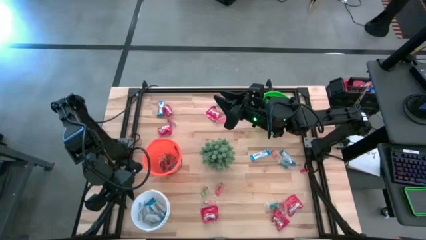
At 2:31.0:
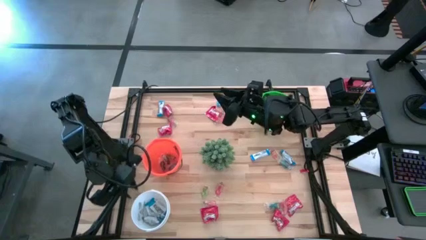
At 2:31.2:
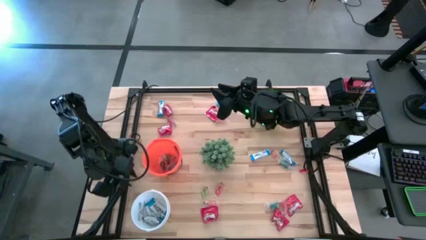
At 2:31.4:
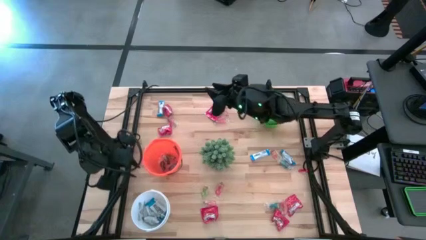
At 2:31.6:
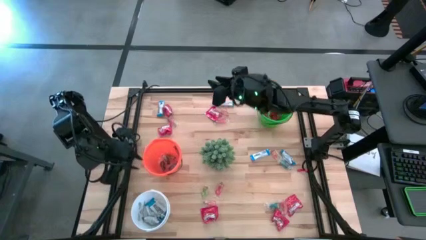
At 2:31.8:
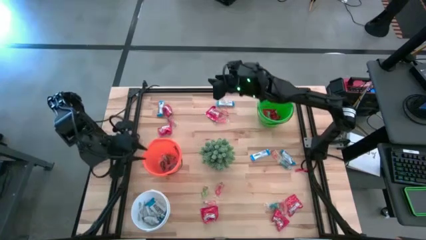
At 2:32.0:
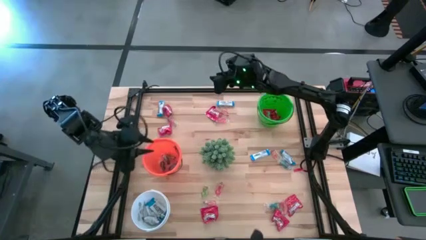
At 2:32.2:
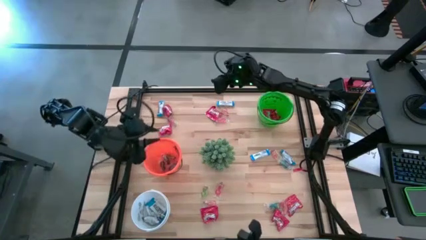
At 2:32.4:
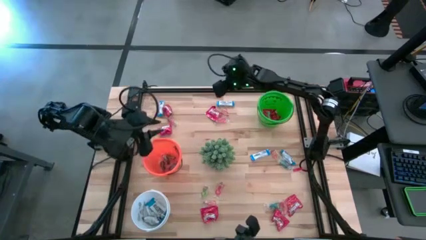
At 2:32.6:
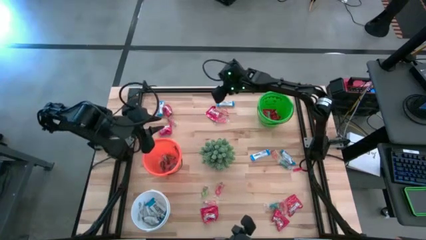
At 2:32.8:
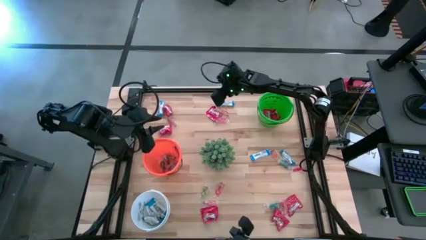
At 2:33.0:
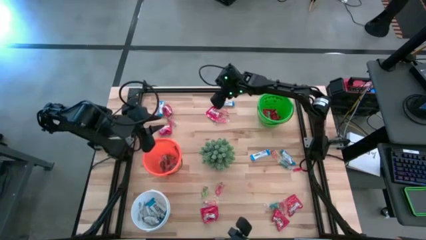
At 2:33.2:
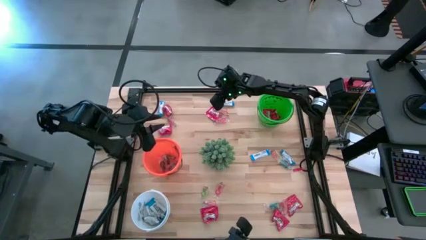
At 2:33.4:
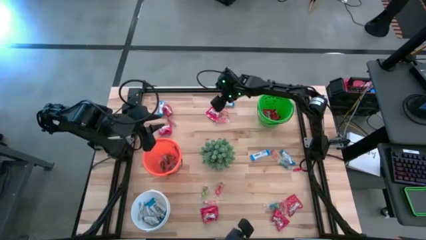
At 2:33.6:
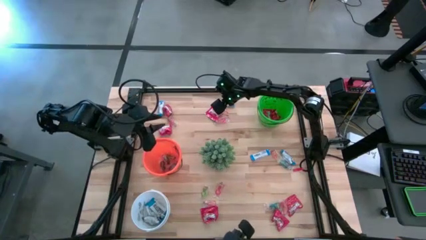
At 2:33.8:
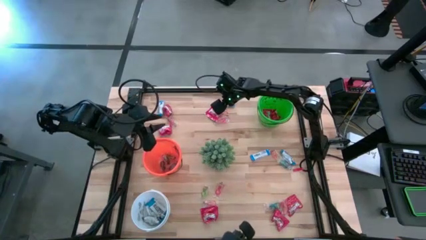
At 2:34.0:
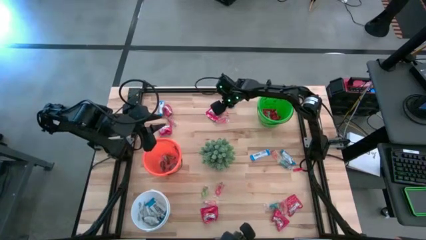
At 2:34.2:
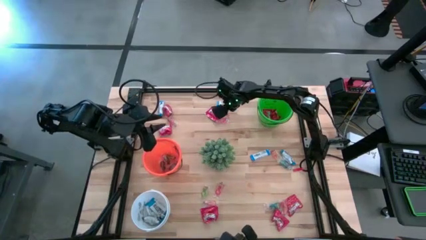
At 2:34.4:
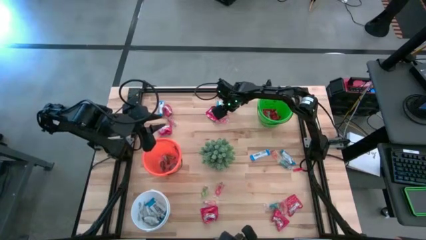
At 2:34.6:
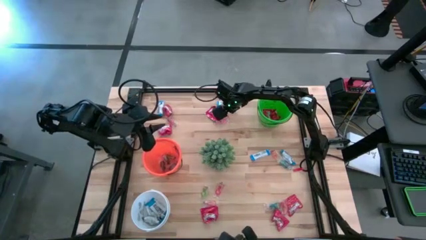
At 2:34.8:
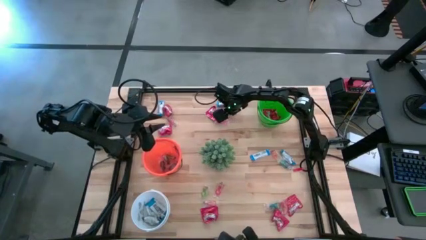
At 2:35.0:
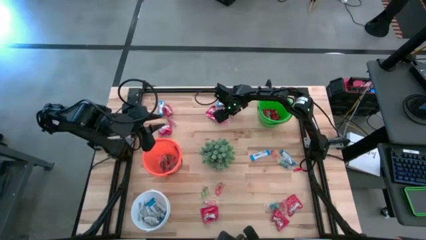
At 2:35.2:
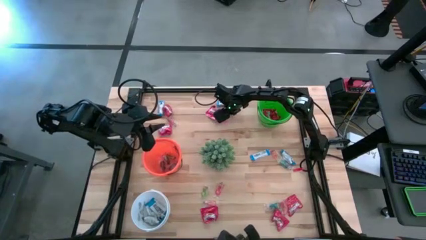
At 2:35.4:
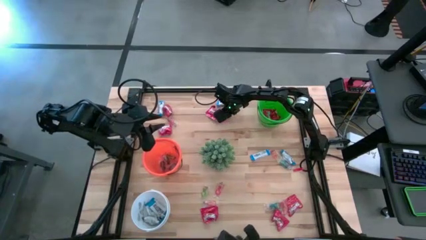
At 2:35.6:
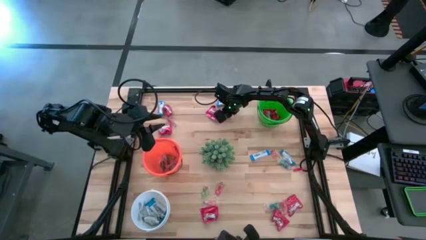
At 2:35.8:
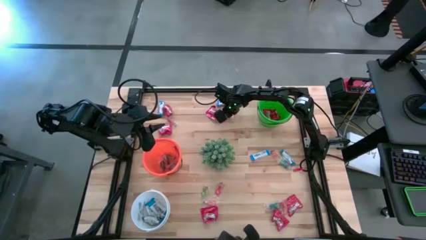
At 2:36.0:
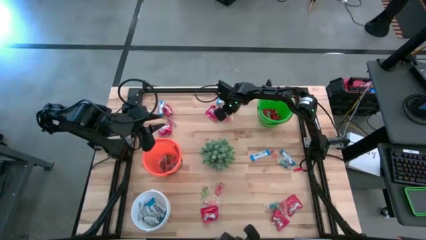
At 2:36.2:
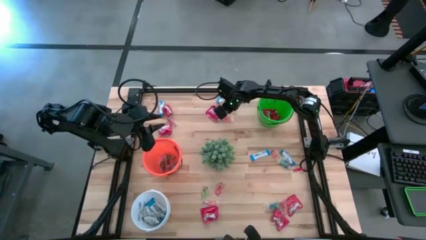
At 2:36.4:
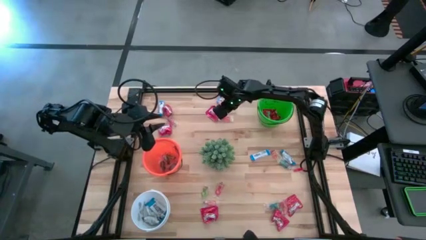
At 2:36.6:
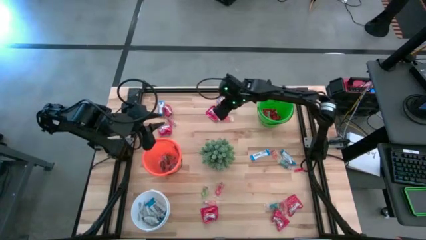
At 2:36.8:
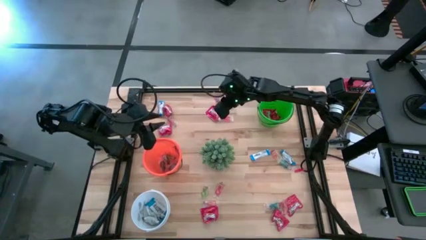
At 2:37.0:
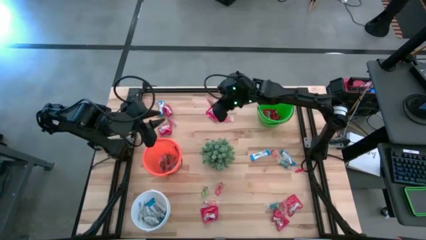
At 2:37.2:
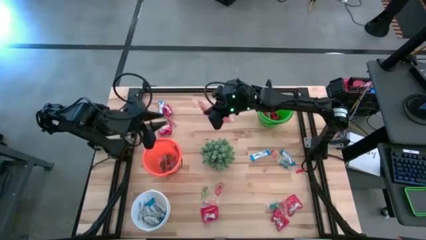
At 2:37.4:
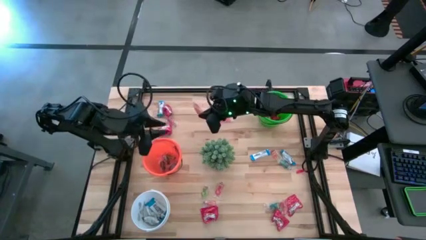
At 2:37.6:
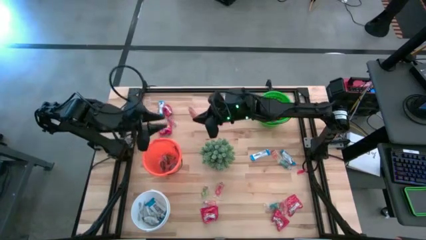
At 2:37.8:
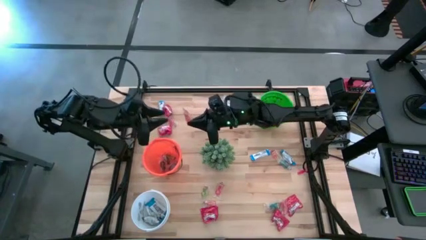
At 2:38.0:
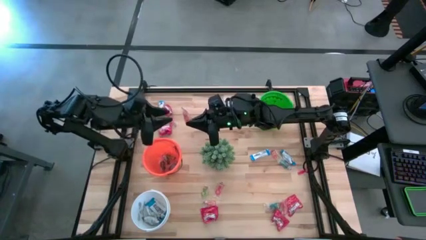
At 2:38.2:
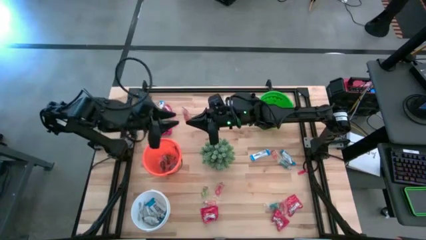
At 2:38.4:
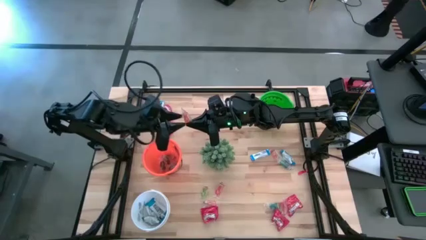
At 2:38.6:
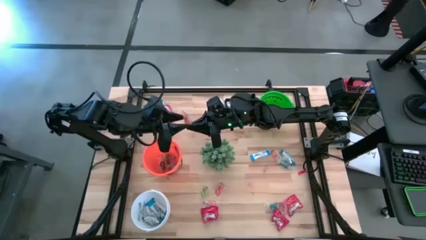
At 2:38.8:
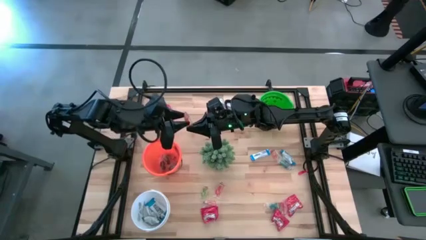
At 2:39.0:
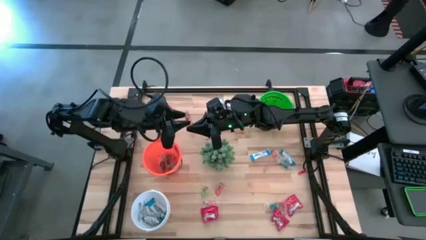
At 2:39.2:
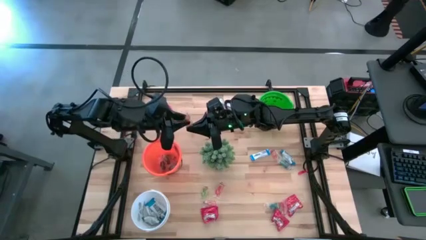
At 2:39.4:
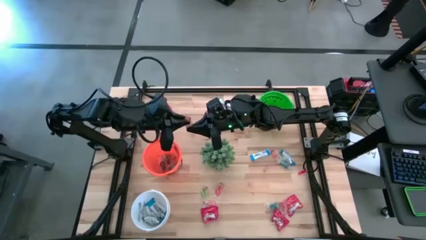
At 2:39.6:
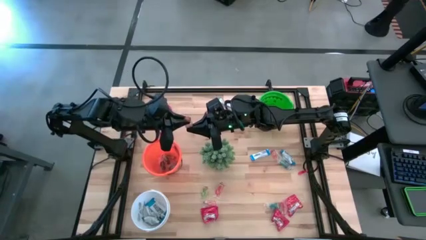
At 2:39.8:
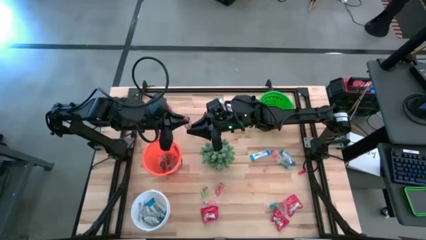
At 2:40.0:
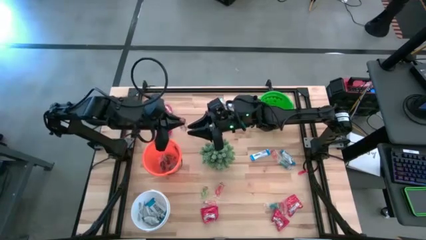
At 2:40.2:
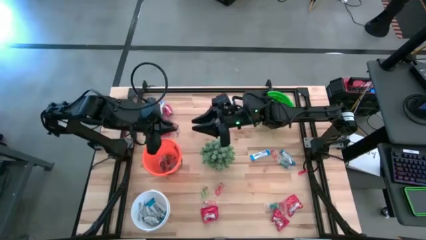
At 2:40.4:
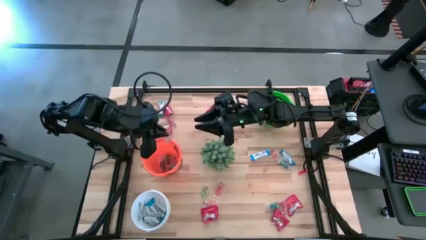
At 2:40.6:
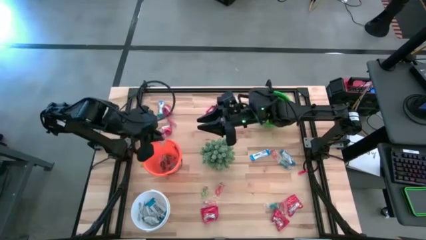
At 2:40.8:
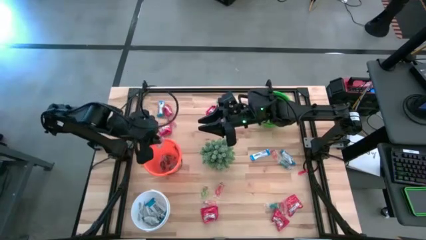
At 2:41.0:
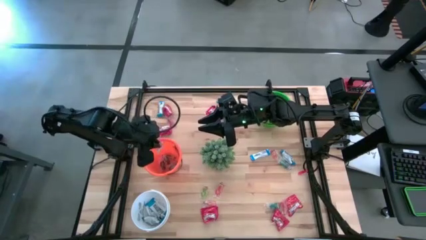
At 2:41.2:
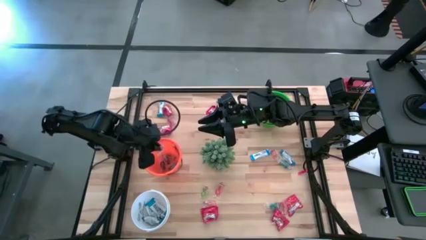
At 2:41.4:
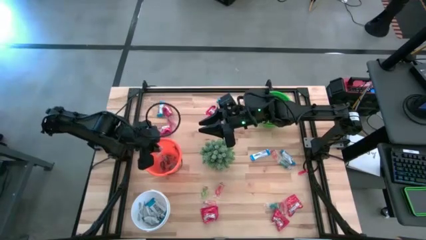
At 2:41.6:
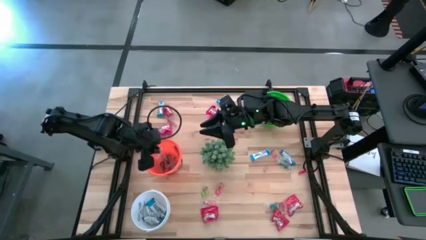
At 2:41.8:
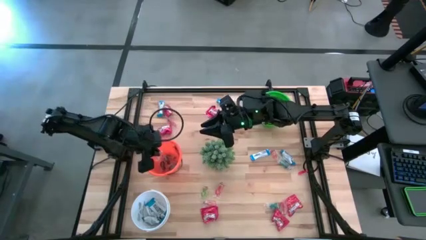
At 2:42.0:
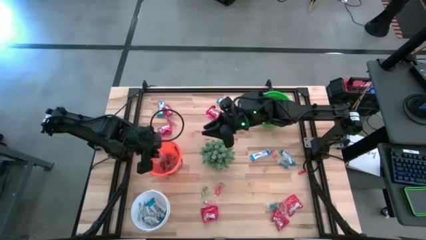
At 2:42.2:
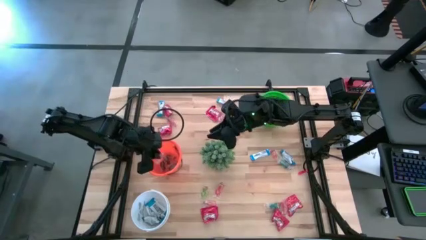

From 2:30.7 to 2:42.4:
Task: Sort candy
Put the orange gummy into the orange bucket

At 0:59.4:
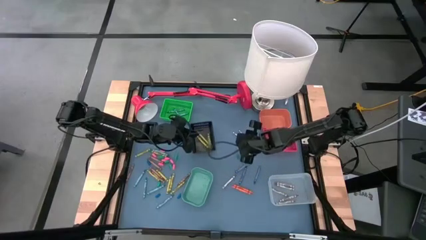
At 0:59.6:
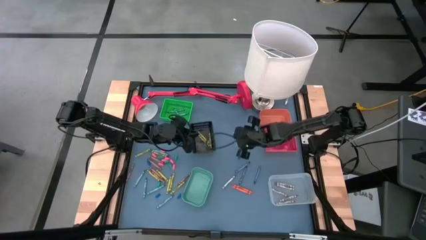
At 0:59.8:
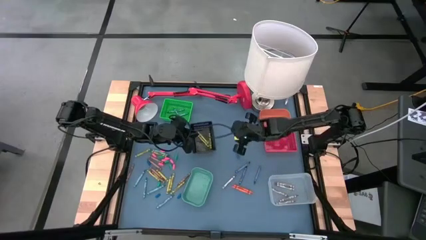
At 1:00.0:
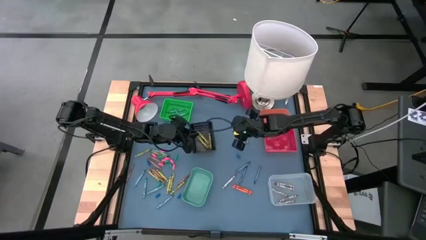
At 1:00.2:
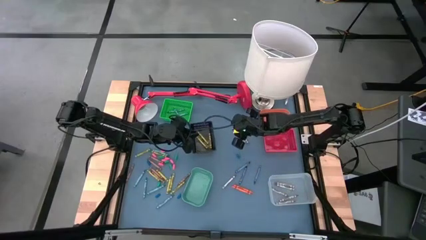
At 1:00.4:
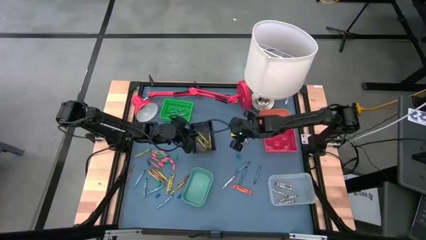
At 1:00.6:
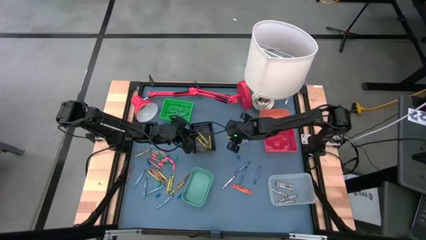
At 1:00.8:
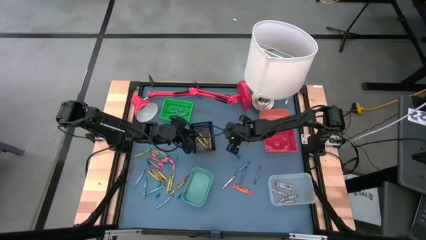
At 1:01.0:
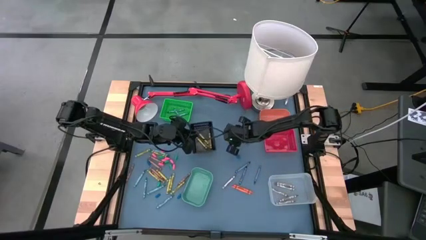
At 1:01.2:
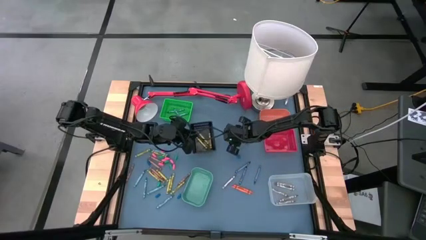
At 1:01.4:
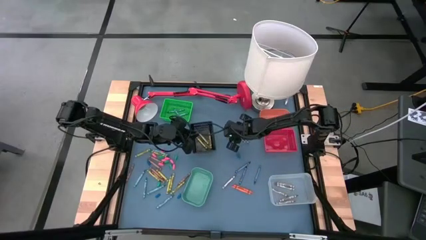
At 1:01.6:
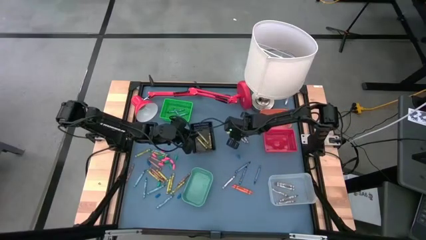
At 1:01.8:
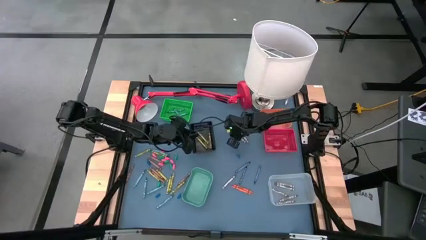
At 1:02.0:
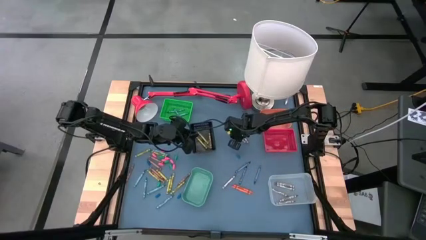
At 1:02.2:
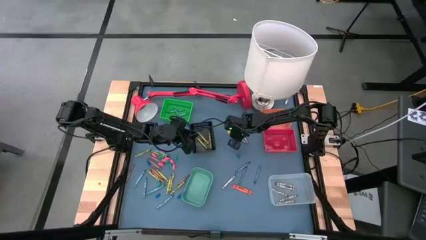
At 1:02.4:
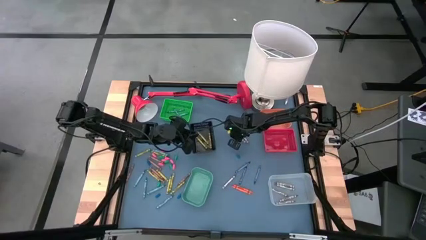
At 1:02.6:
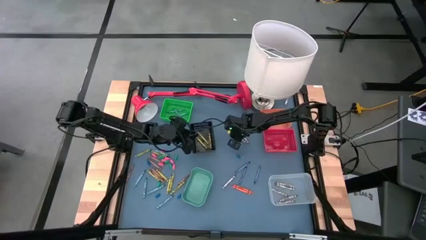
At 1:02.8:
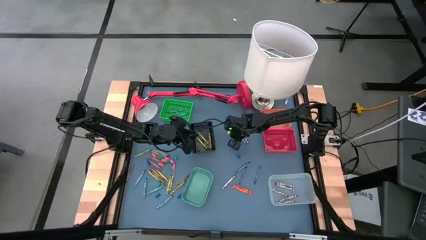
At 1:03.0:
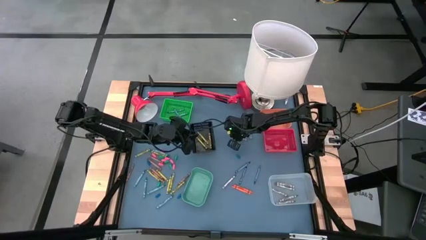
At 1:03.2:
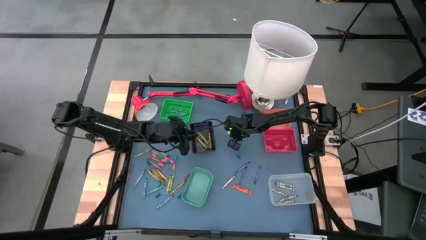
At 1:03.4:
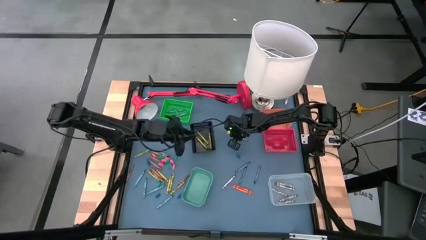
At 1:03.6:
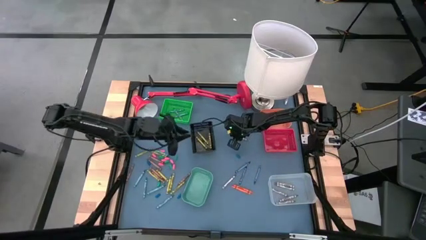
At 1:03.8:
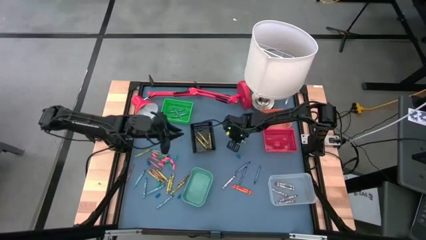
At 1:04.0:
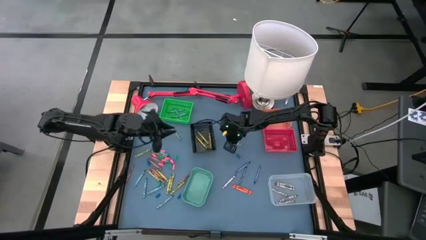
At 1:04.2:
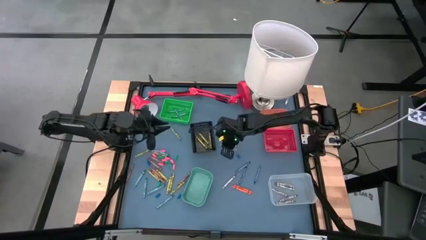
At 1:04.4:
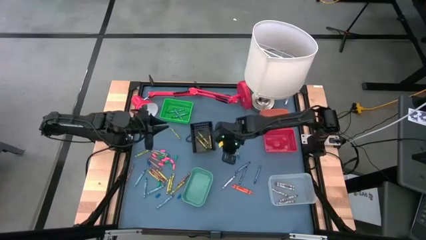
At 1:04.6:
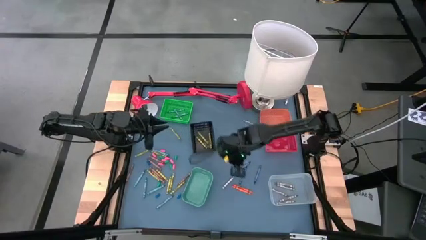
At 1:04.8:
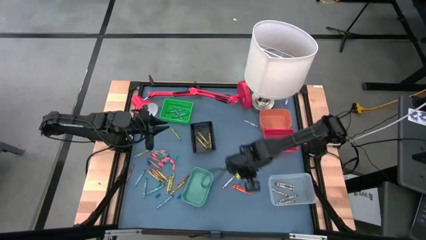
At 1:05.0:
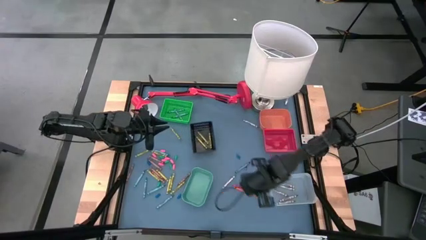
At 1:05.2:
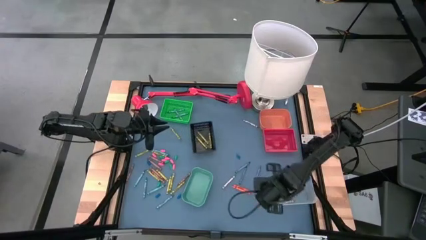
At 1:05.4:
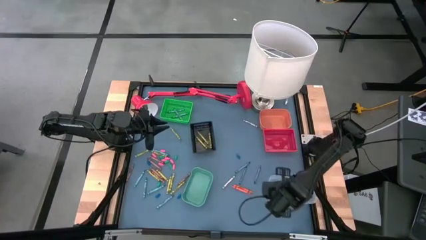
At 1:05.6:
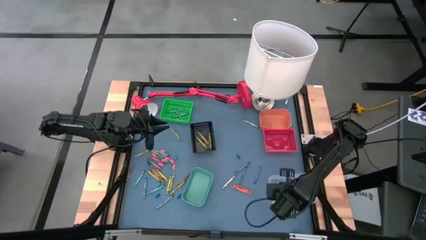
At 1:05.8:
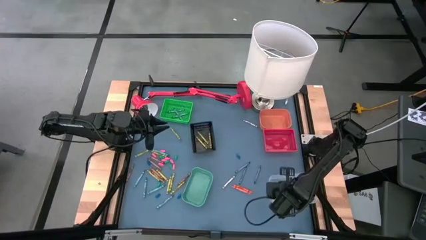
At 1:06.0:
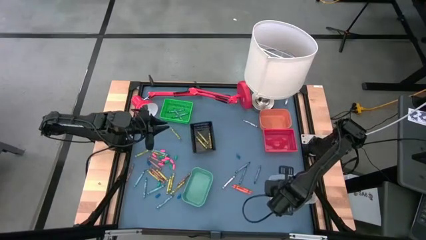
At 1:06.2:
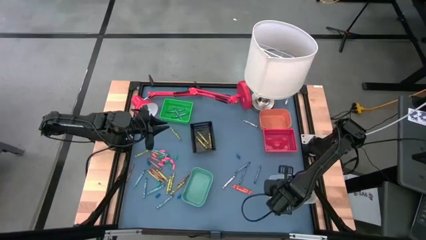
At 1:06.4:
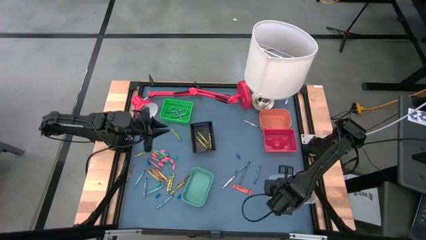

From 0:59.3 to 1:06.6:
Task: Sort crayons
Put the gray crayon into the white bin
